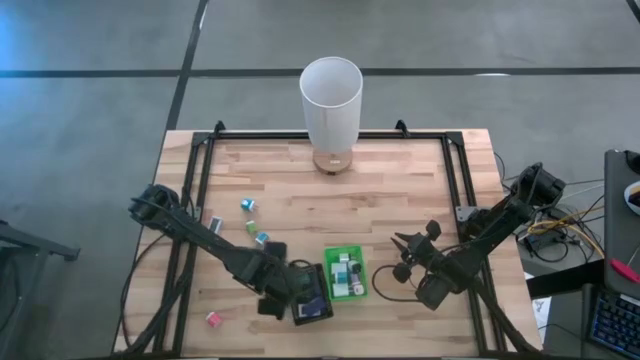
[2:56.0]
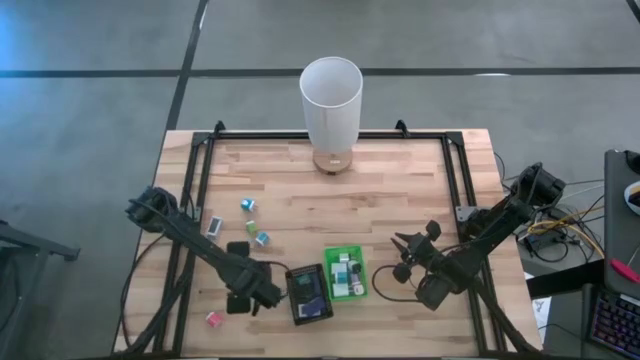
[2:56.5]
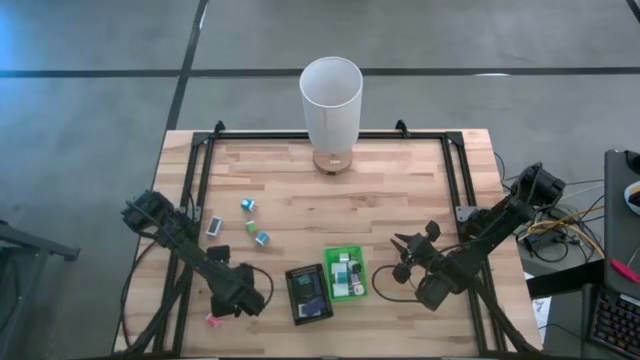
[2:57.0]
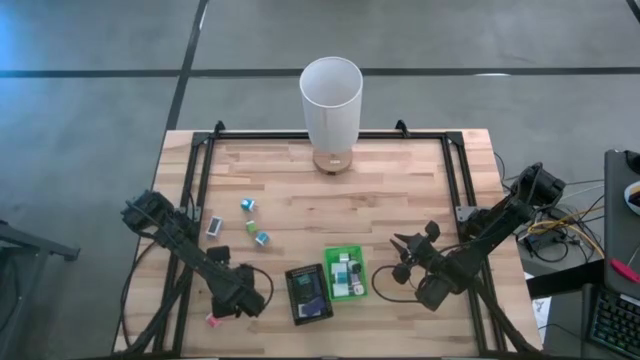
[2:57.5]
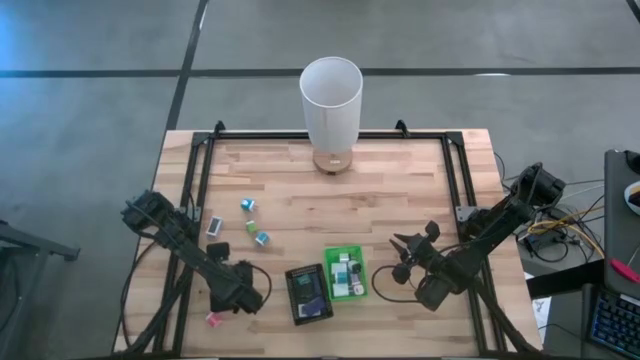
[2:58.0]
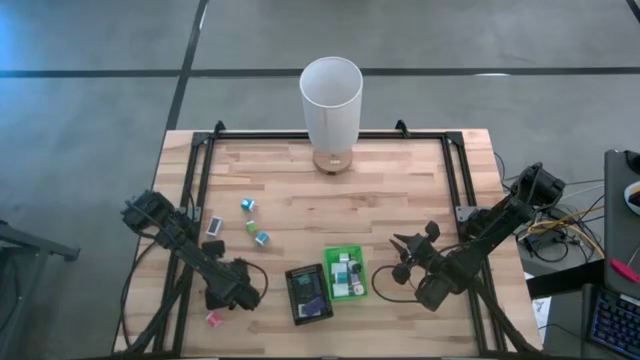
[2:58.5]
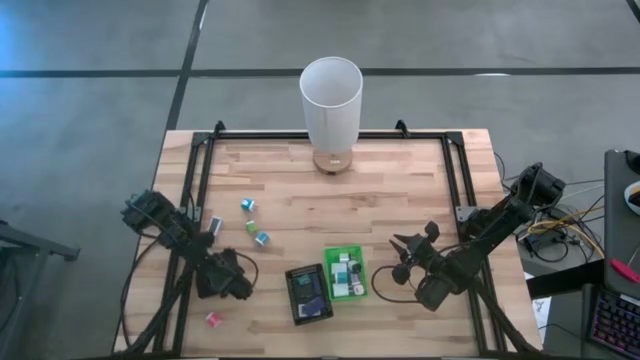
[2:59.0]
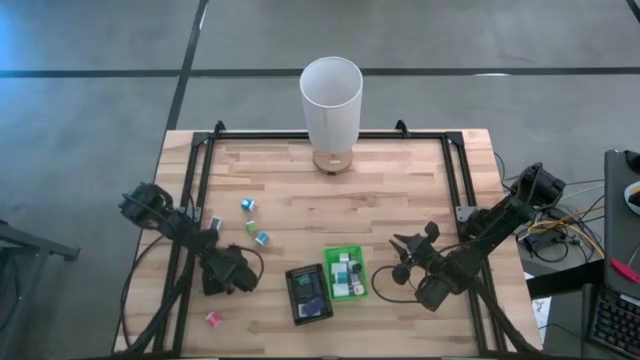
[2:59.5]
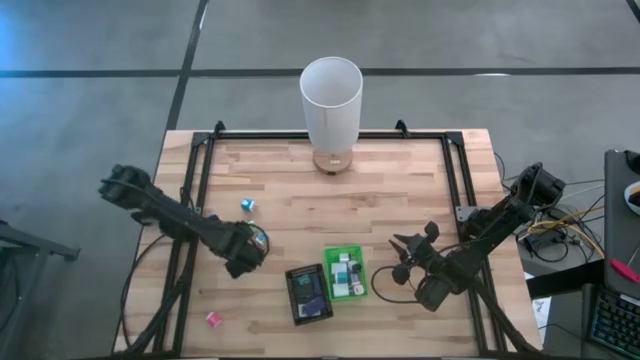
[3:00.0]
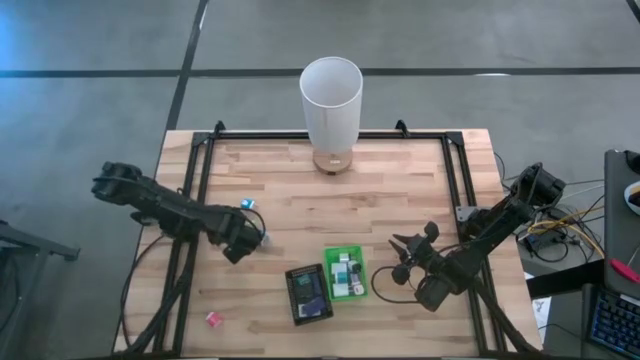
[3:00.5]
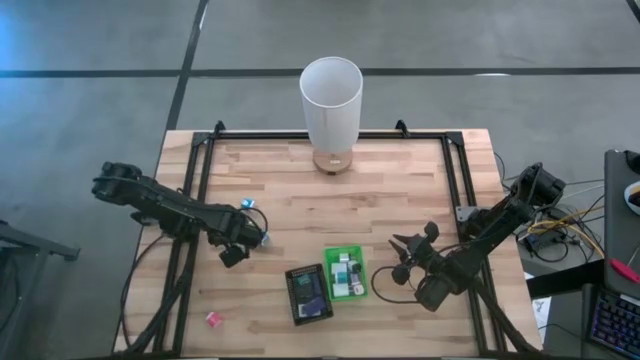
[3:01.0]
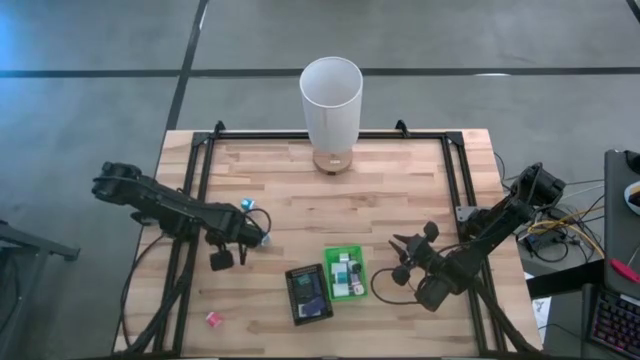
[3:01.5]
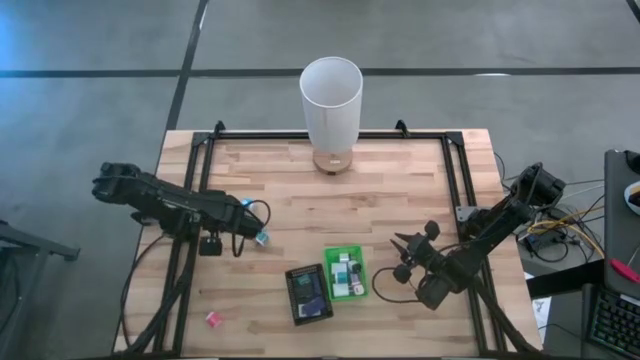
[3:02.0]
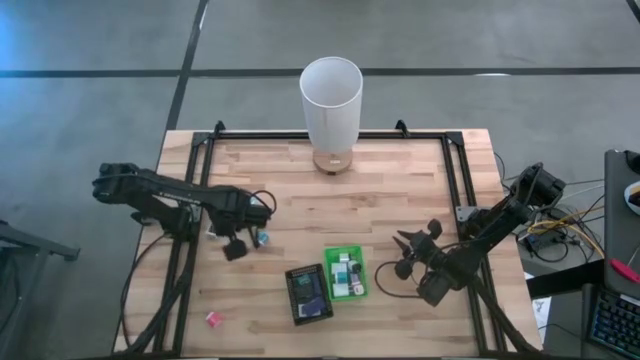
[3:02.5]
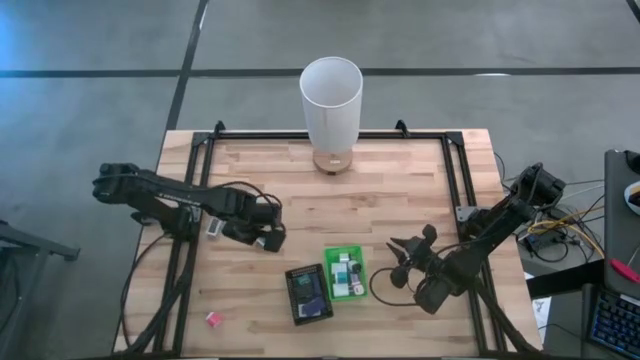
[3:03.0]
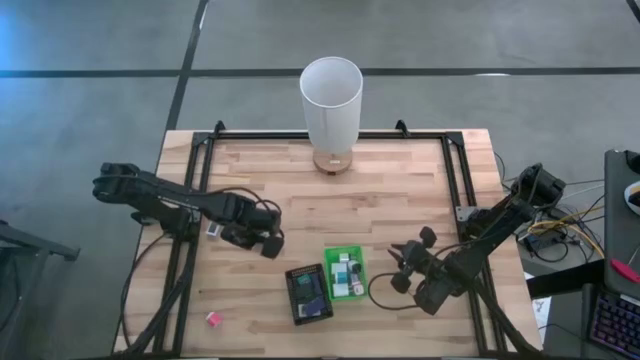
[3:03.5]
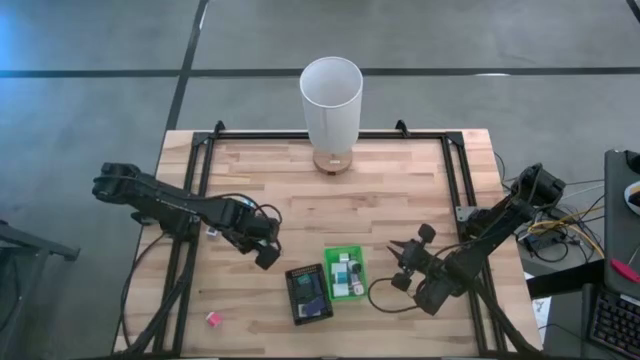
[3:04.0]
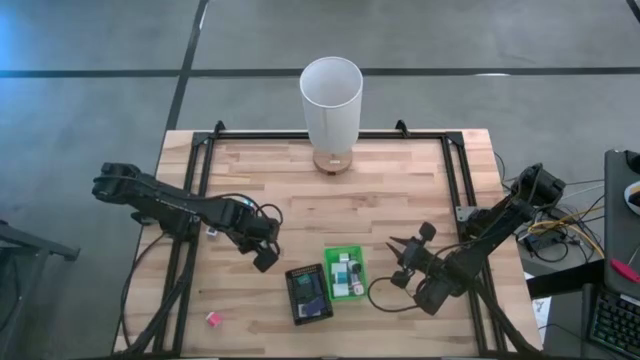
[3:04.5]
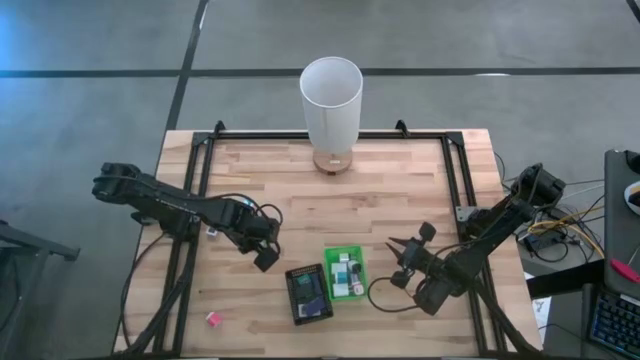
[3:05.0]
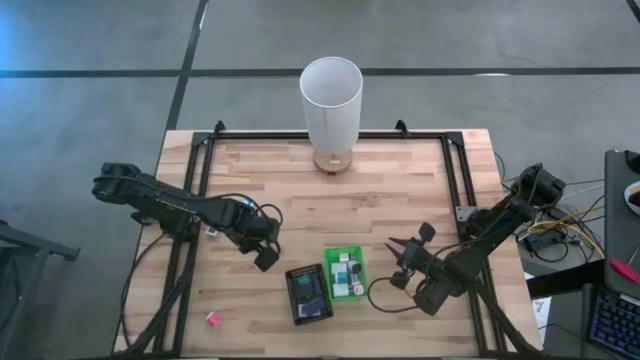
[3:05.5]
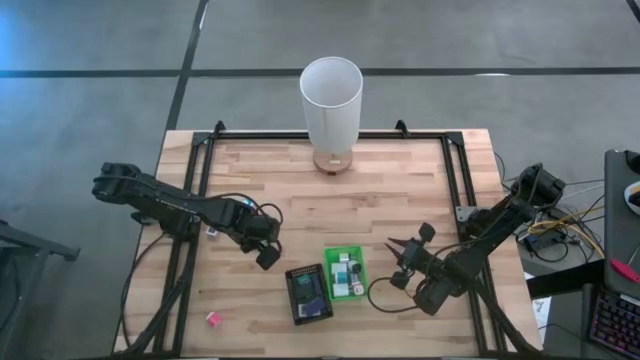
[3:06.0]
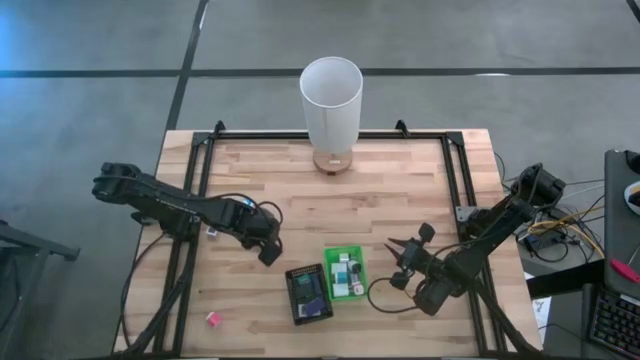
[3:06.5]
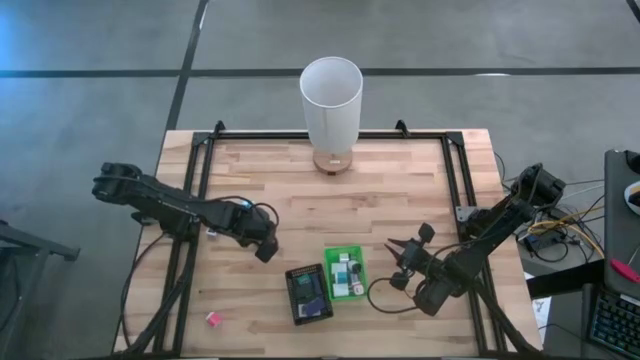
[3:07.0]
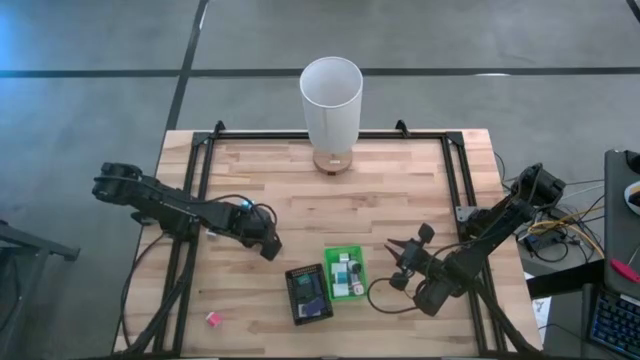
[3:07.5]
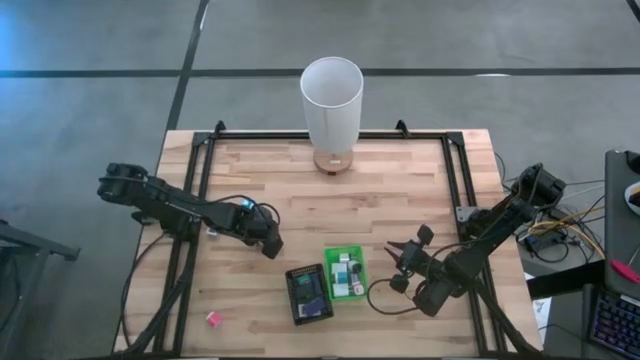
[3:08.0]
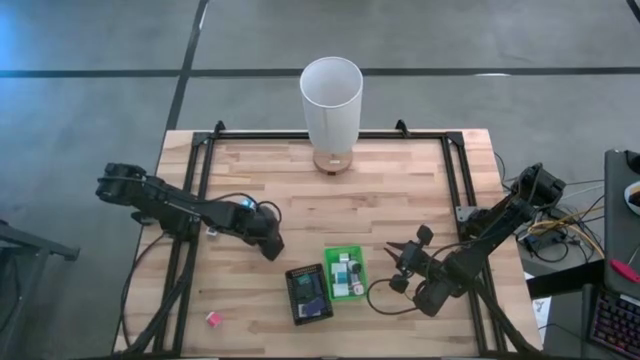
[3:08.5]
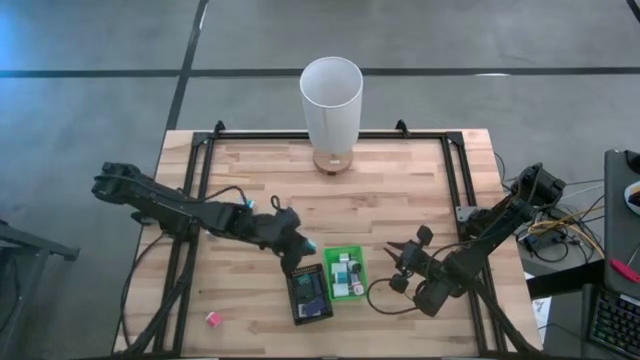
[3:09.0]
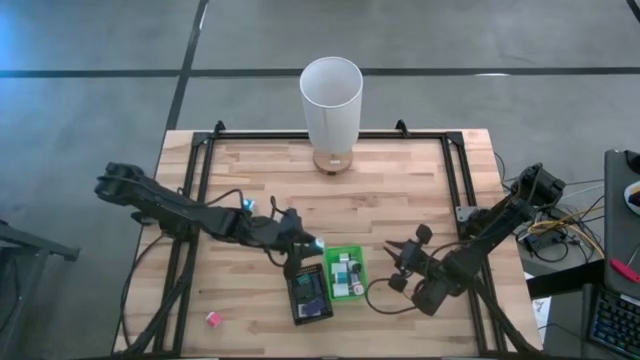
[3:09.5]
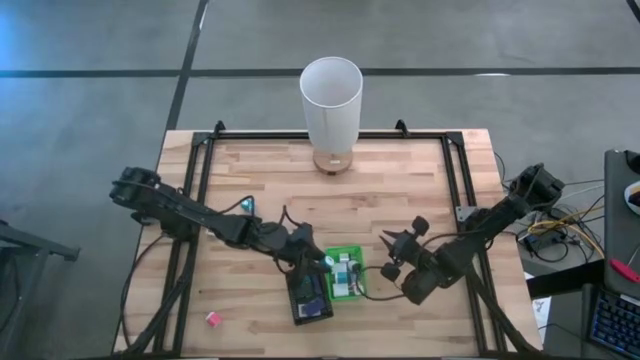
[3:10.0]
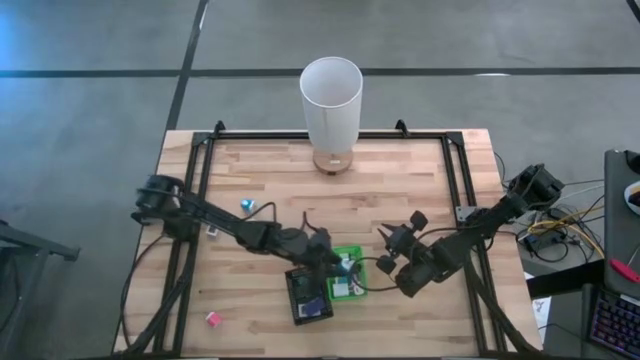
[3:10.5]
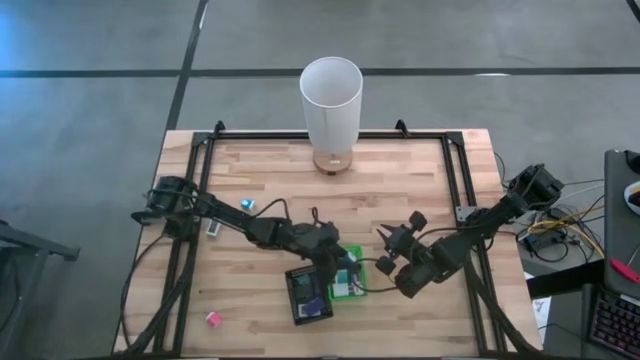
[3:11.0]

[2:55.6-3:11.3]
Task: Pick & Place Office items
Put the bottom blue charger adapter into the green bin

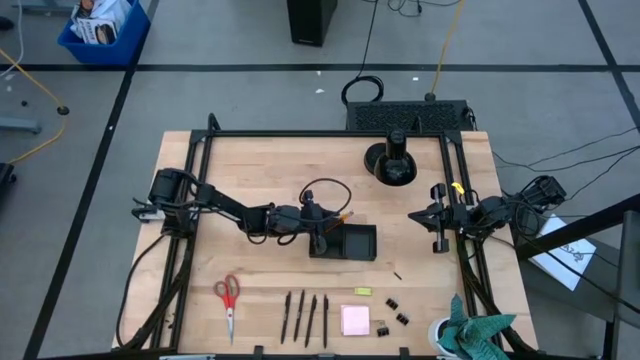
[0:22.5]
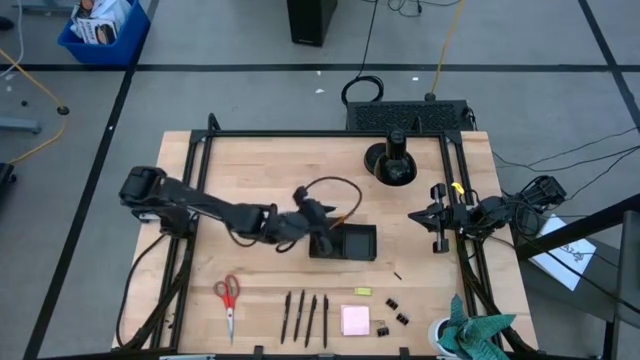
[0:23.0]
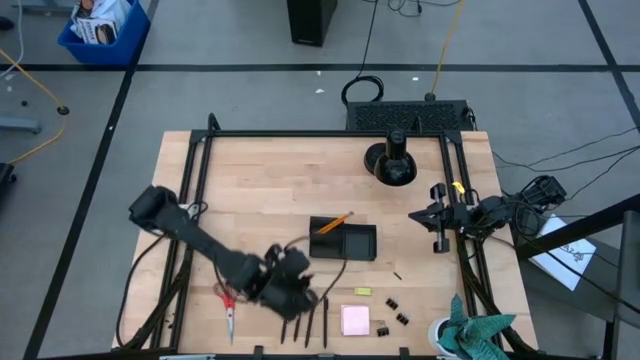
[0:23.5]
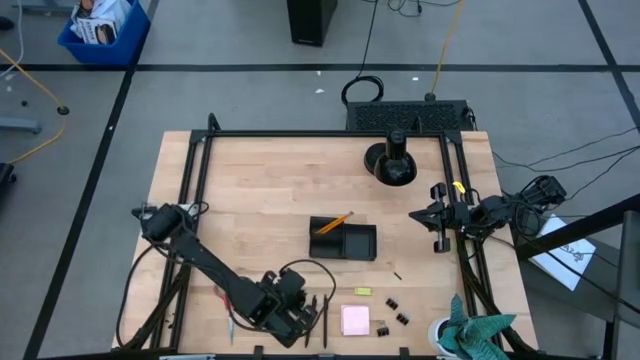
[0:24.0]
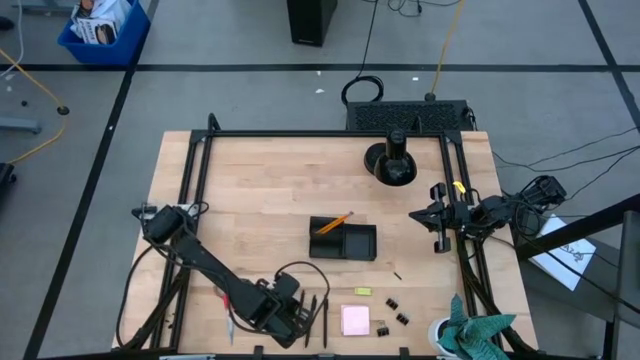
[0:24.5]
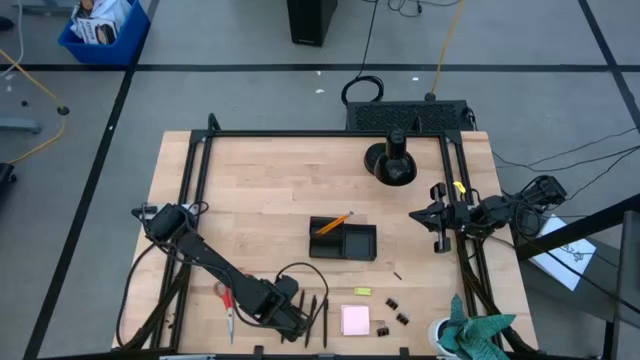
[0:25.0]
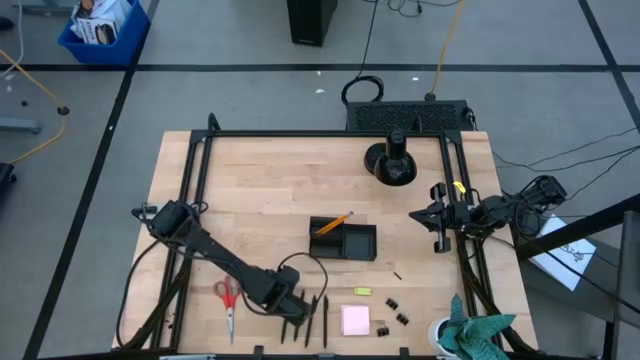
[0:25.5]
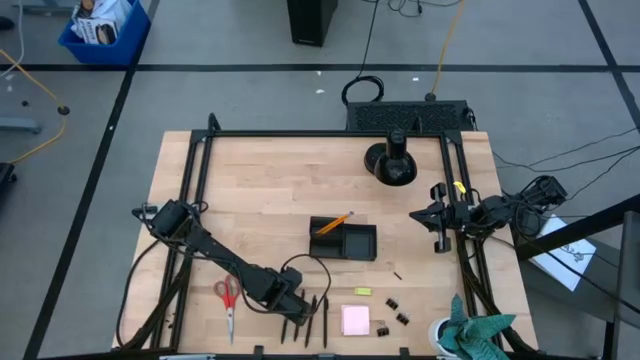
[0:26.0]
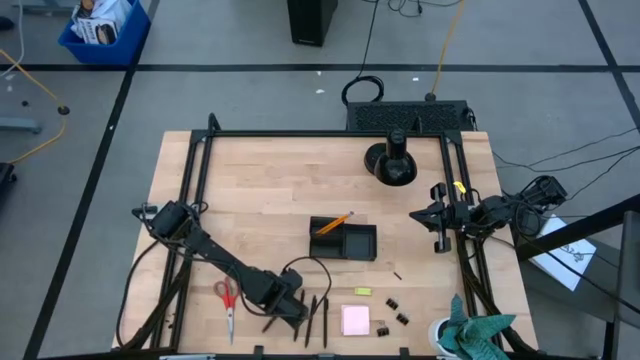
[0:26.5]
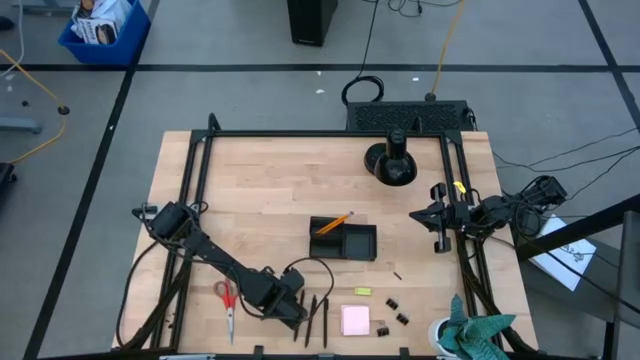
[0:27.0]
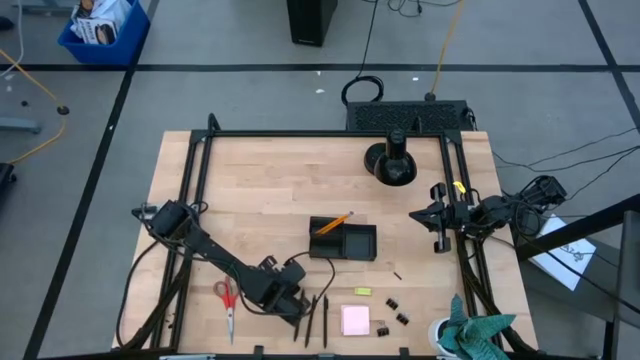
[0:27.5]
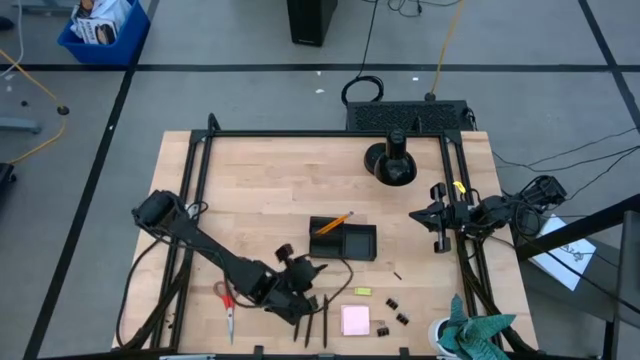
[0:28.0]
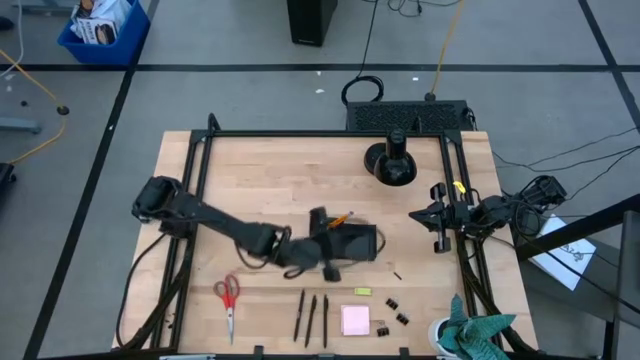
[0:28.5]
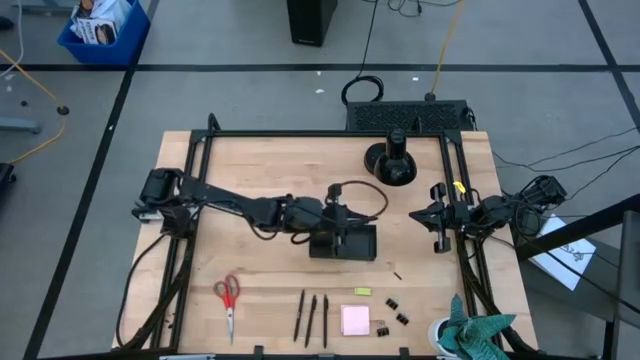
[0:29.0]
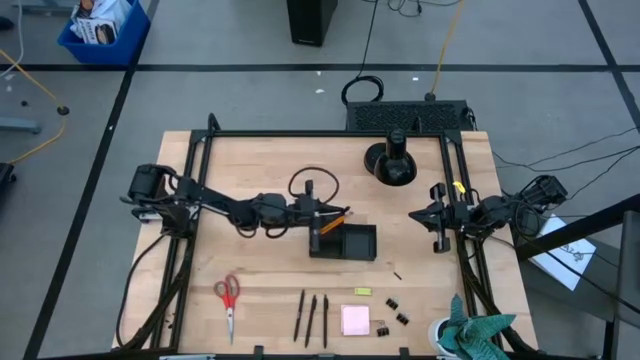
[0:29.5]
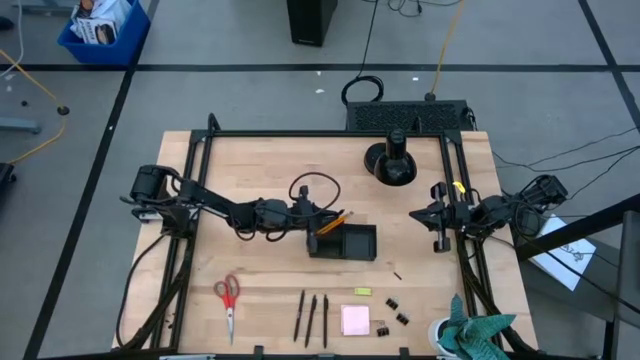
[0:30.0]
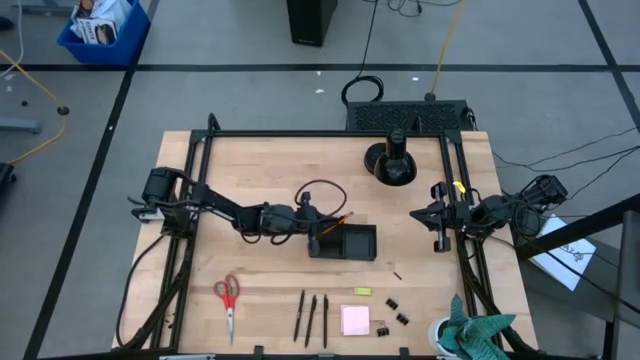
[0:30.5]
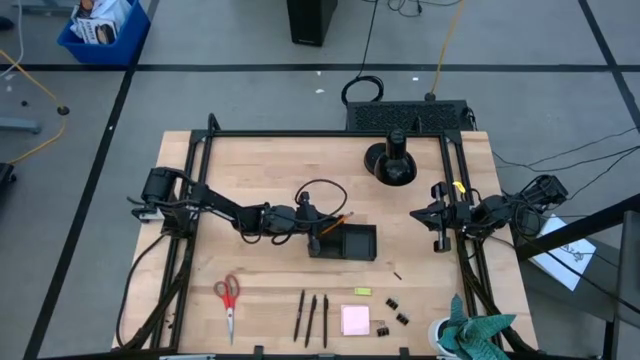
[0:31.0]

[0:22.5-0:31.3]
Task: Pick and place office supplies into organizer
Put the black pen into the black desk organizer
